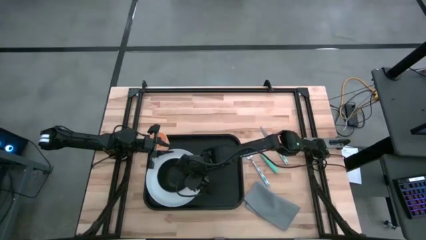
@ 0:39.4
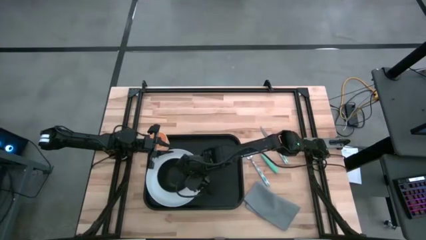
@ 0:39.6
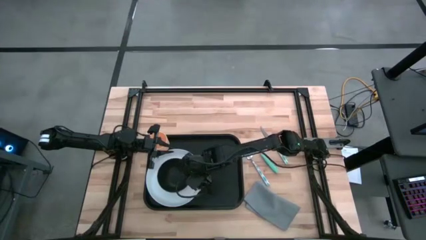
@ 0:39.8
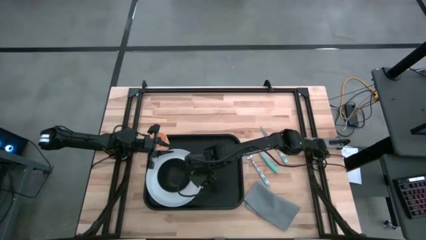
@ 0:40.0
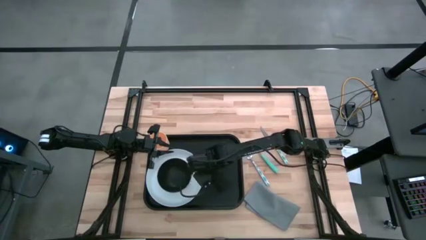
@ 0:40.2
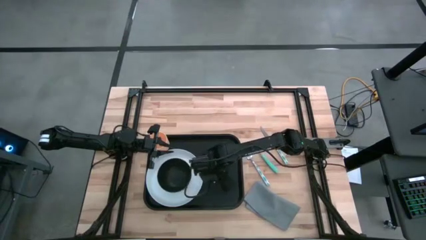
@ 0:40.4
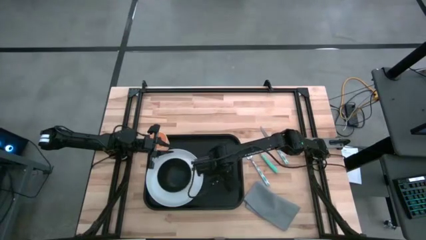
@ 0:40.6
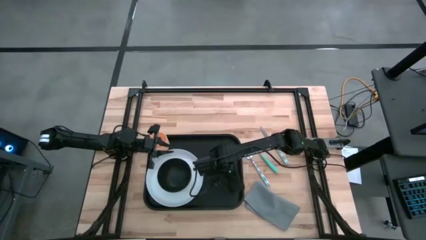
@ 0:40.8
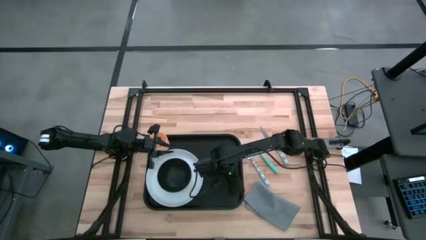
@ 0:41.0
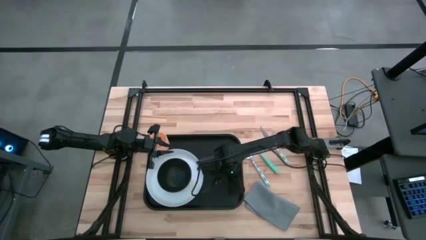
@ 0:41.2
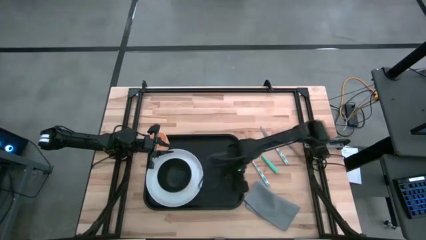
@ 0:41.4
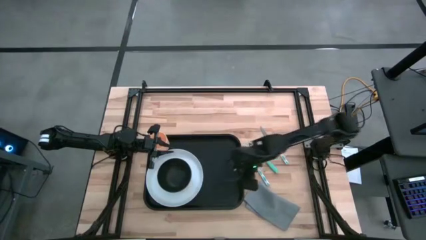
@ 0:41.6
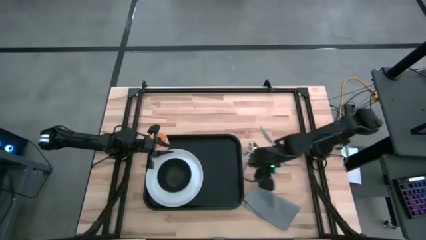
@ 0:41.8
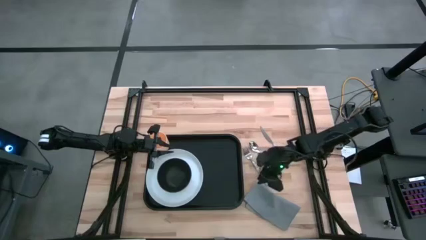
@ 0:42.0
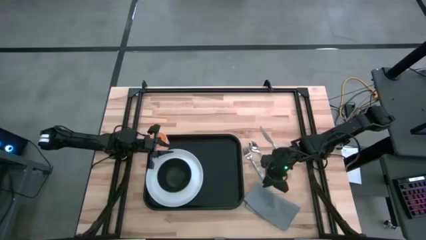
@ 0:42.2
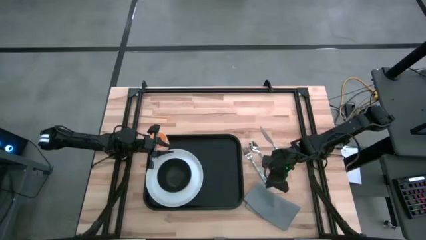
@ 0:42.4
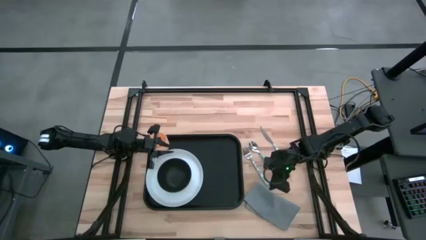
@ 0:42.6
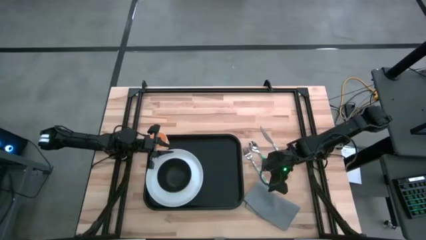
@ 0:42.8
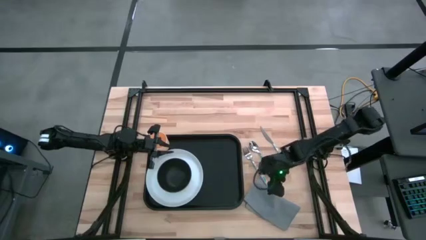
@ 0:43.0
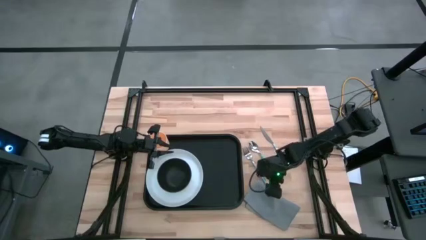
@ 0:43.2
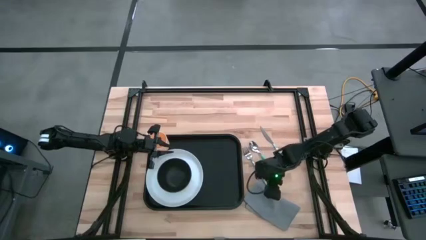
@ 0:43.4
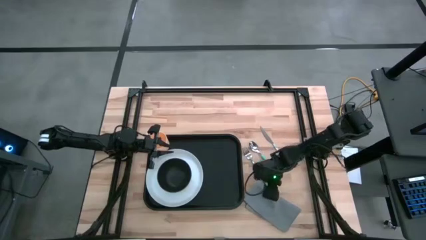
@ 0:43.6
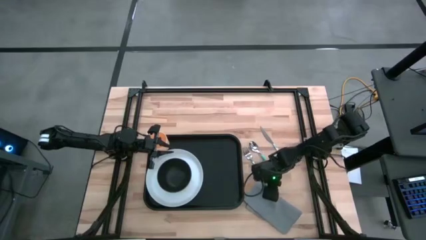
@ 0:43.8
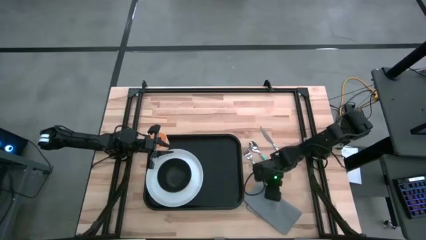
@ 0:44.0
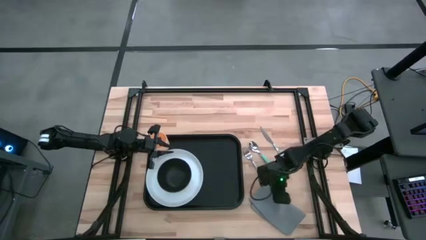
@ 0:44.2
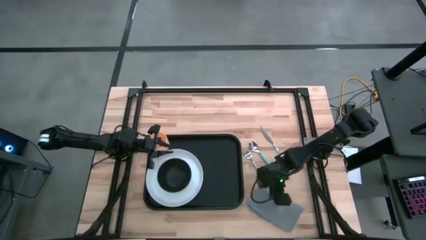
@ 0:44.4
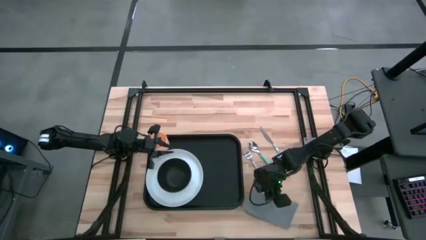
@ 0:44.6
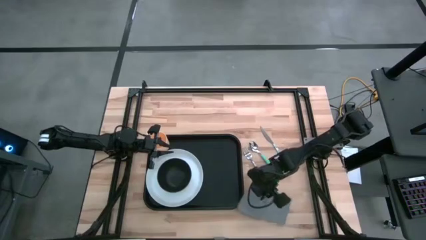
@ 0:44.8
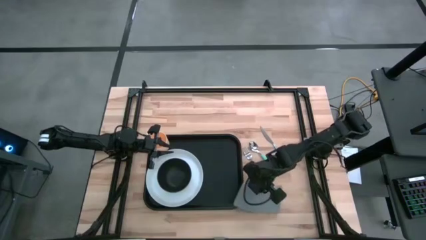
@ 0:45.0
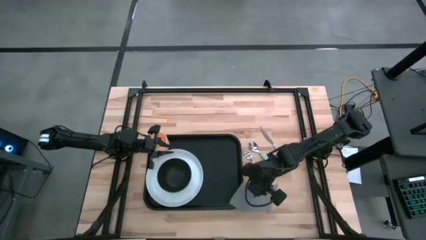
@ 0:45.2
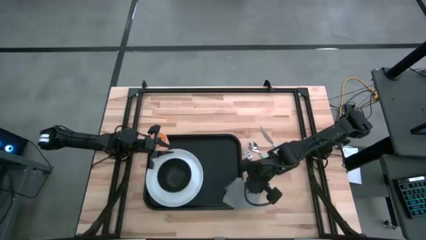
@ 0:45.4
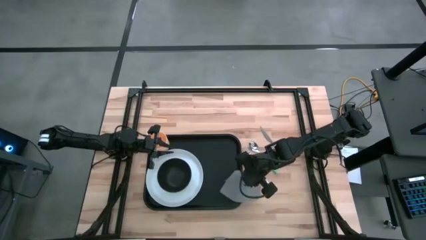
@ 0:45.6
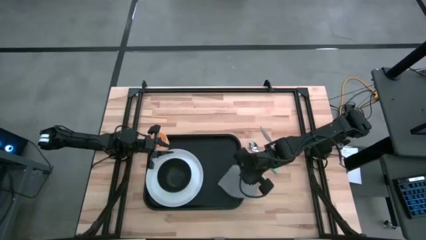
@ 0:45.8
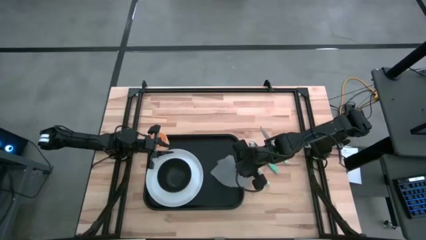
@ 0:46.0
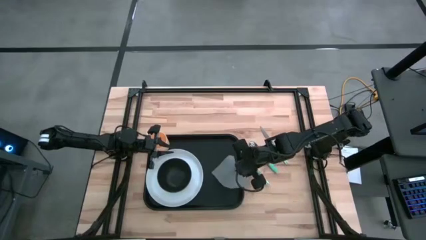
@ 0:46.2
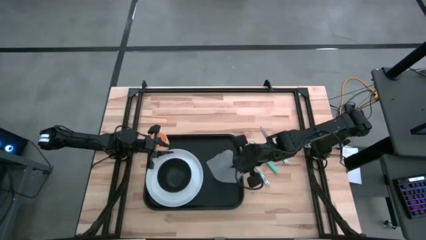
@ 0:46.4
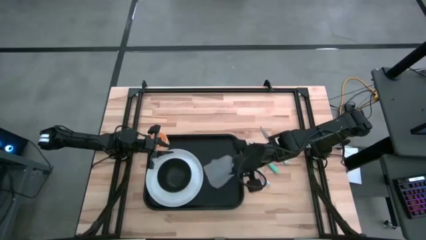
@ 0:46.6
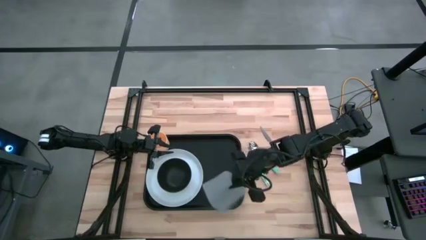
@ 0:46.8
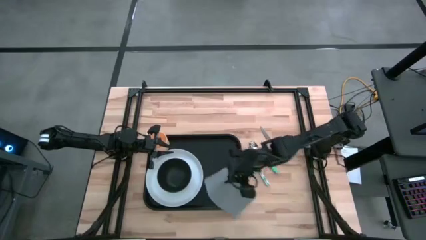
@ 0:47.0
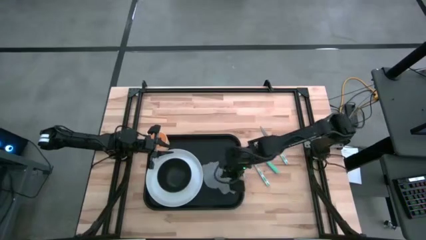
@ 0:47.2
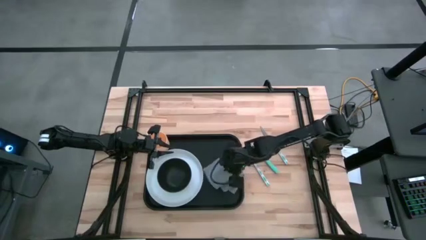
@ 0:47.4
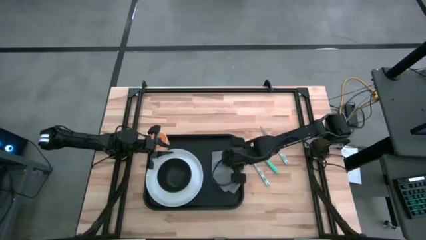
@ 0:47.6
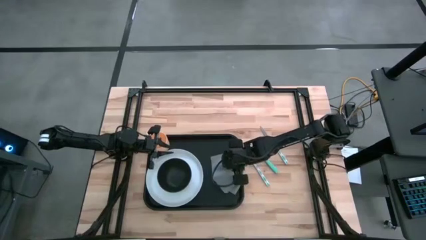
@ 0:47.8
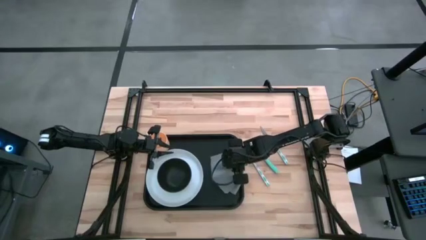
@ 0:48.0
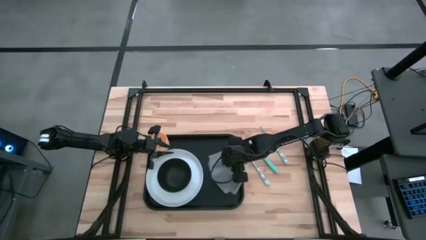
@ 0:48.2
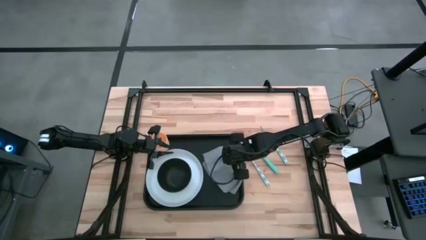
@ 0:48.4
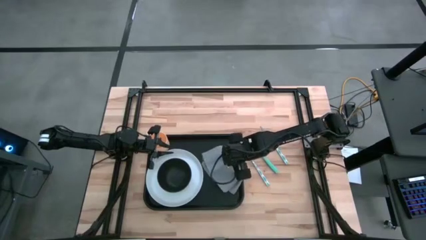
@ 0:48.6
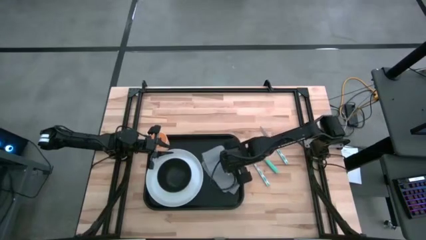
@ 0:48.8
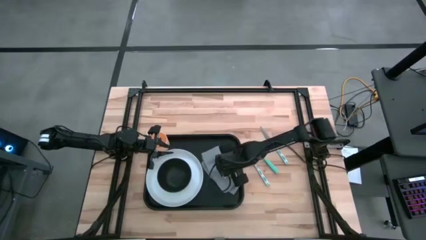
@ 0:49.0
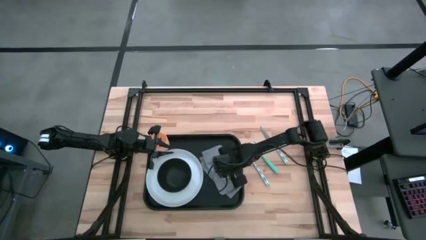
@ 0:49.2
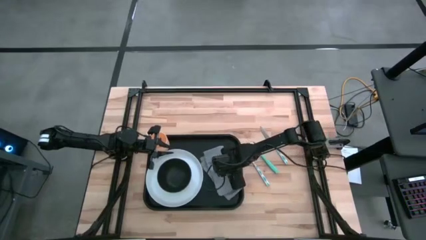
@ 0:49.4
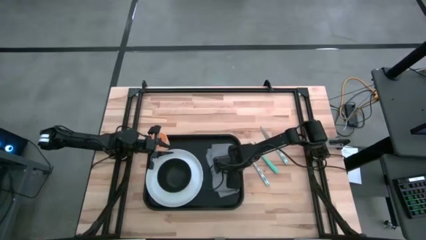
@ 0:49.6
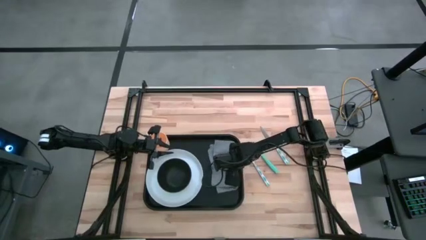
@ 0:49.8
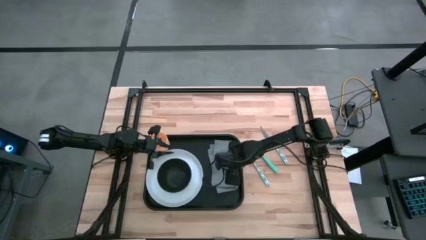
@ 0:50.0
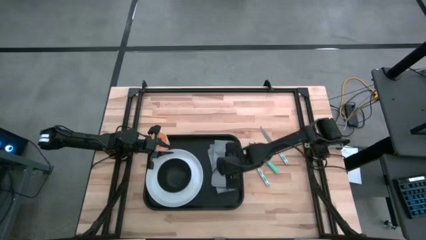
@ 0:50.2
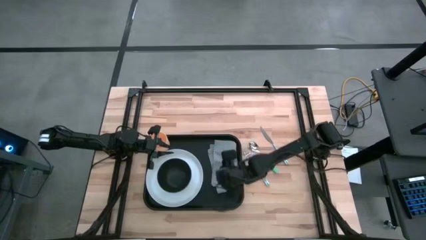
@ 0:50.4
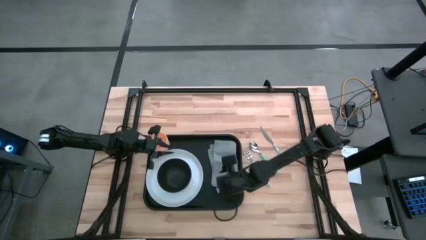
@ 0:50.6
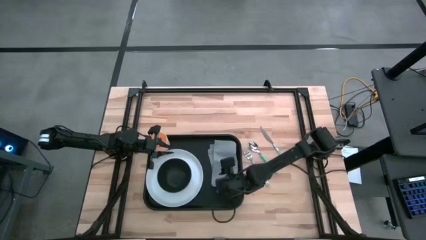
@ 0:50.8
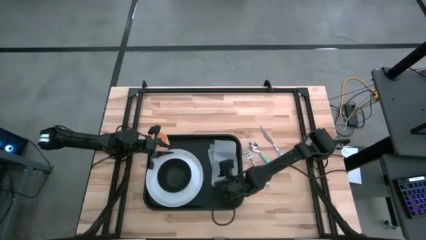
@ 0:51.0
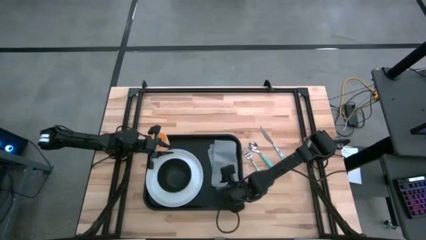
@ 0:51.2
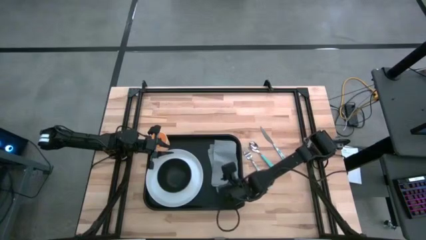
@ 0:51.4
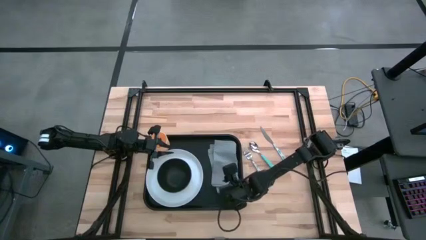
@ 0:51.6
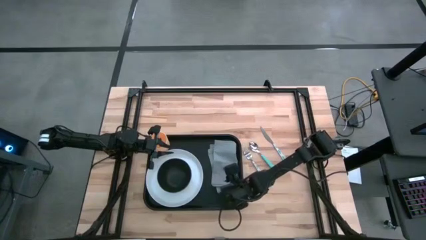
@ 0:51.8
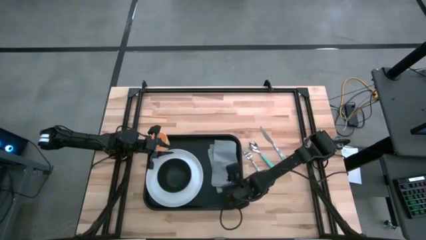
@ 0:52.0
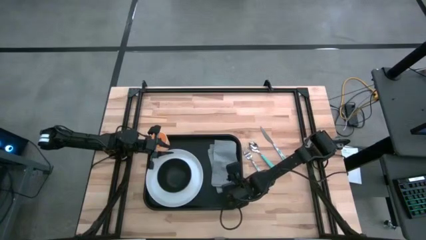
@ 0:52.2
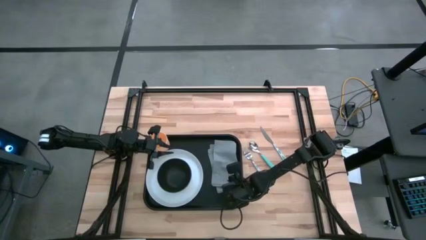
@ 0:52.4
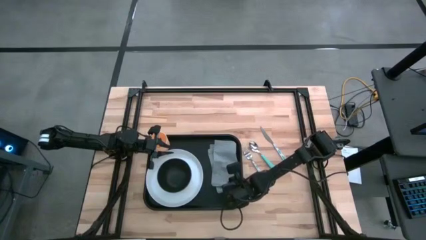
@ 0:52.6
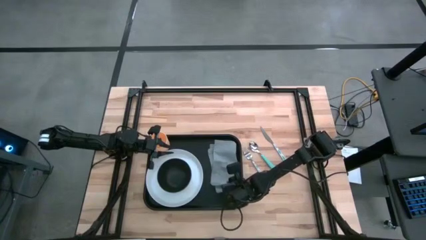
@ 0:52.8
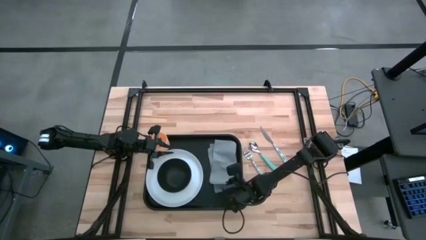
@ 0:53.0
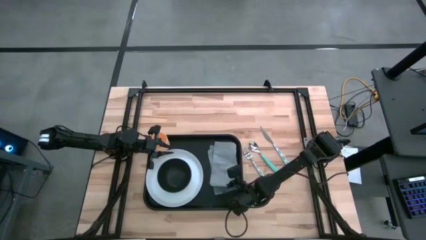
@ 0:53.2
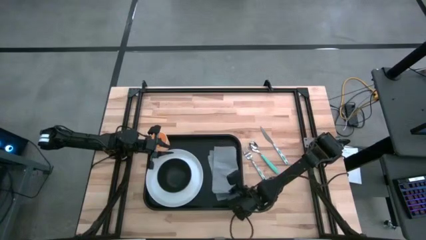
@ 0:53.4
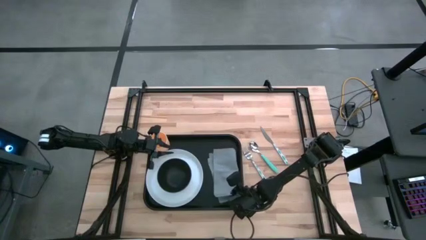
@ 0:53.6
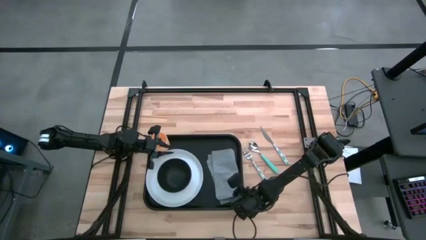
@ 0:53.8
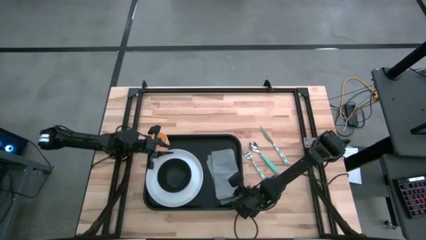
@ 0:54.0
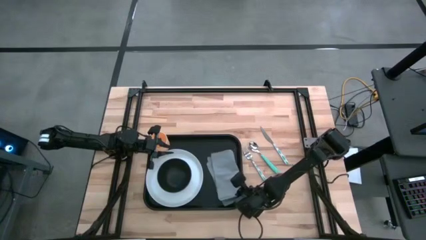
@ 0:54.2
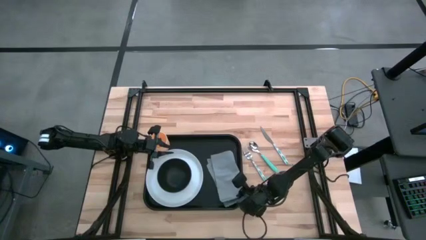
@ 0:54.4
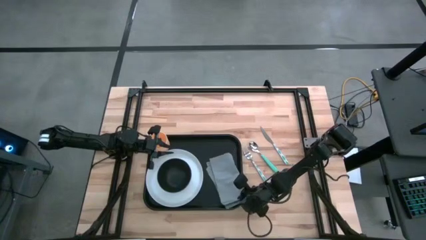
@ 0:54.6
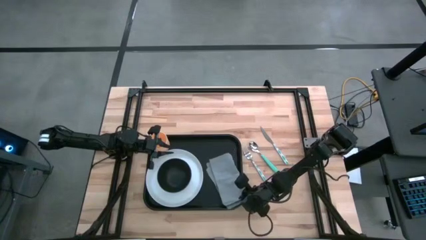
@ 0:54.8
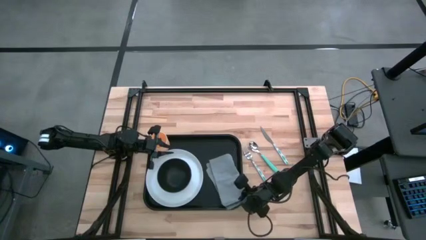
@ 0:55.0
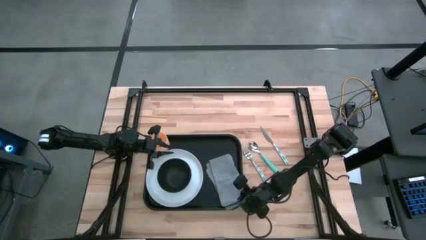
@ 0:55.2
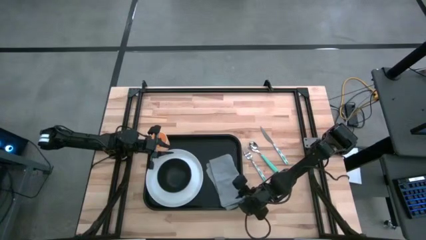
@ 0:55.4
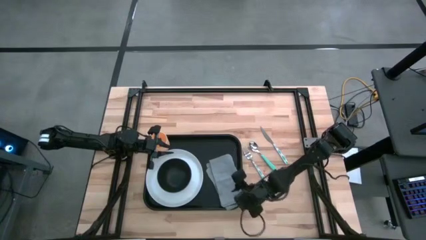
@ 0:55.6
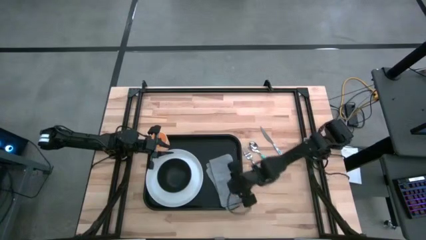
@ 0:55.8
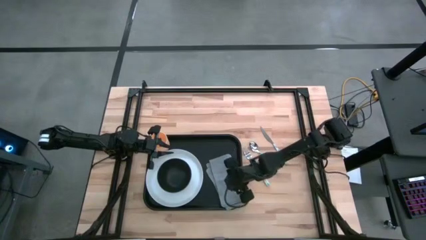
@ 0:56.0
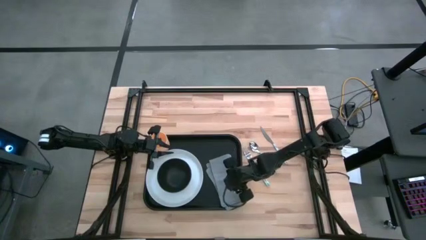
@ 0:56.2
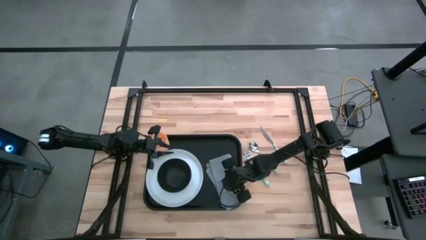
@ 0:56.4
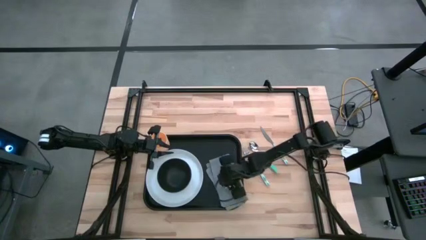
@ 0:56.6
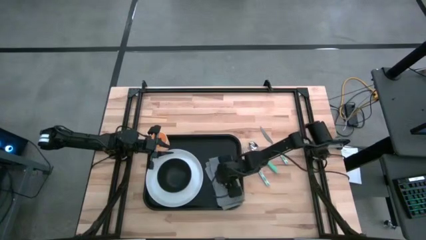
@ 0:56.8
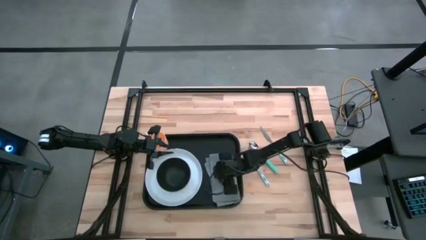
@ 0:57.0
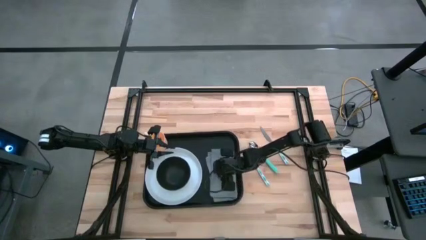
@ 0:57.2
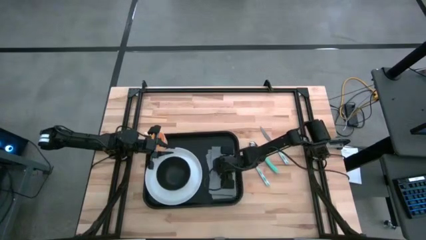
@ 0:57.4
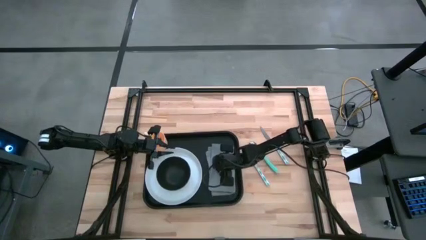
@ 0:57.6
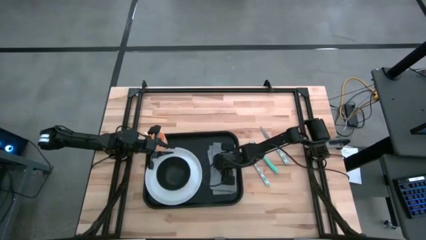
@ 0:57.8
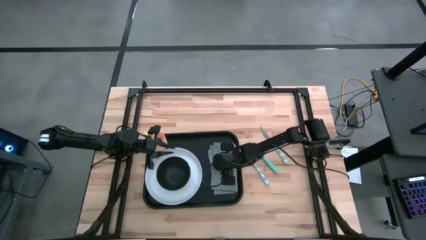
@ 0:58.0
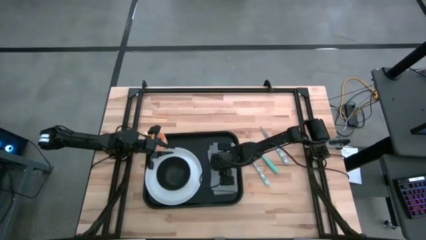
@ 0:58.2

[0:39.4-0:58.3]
Task: Set up tray
Put the gray napkin on the black tray to the right side of the white plate
